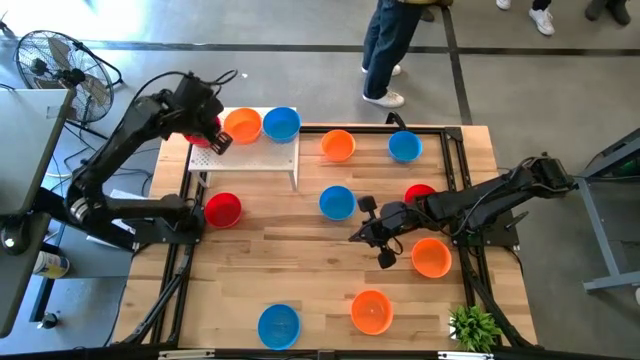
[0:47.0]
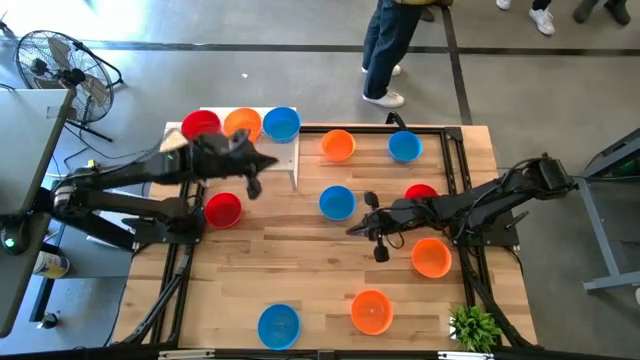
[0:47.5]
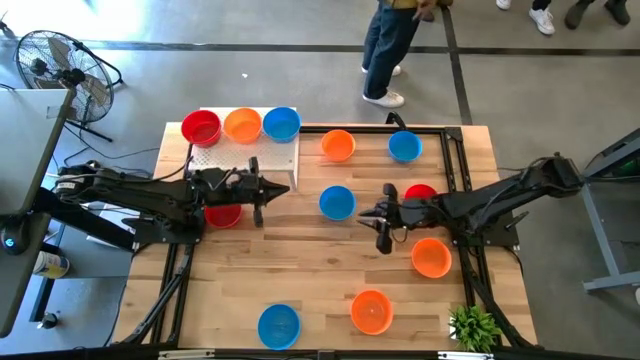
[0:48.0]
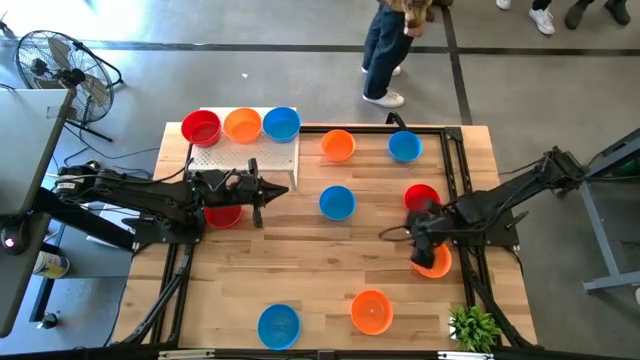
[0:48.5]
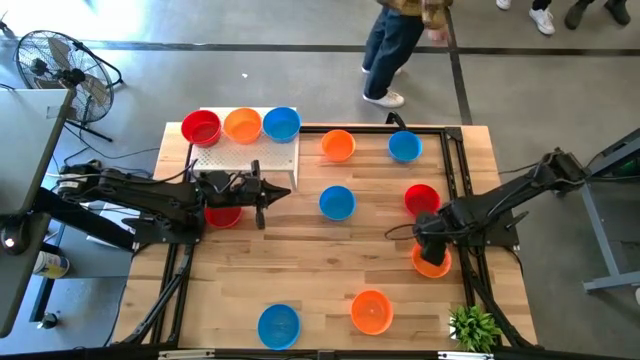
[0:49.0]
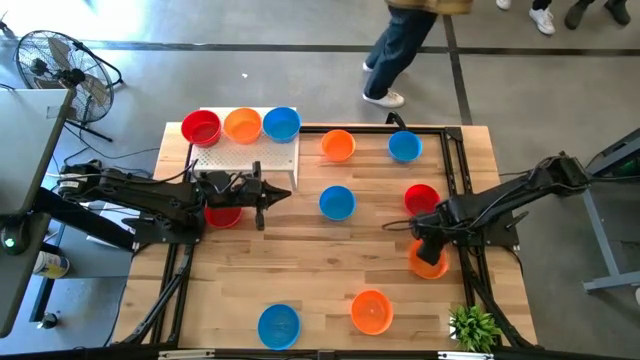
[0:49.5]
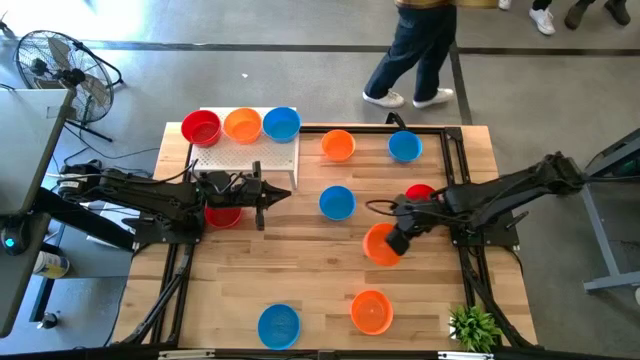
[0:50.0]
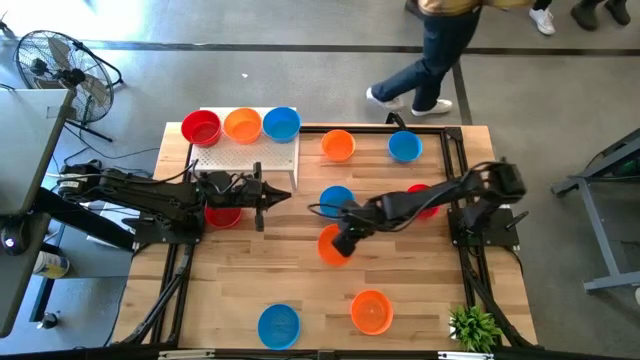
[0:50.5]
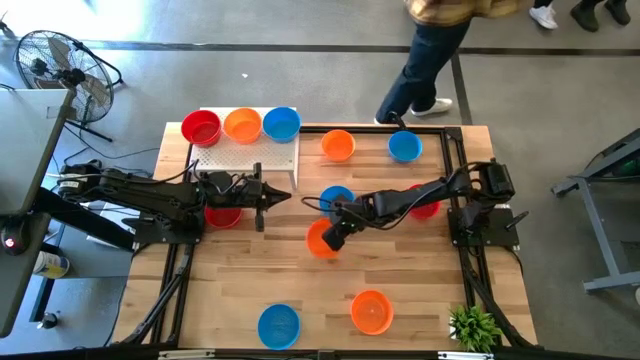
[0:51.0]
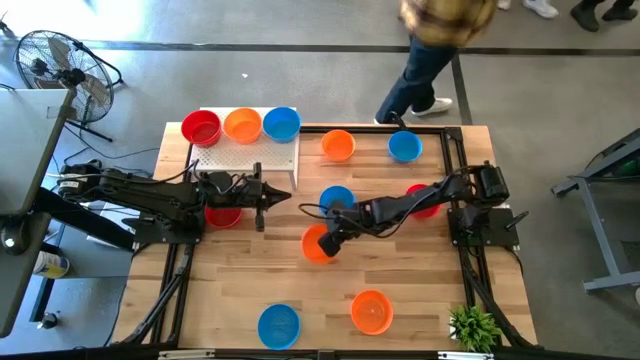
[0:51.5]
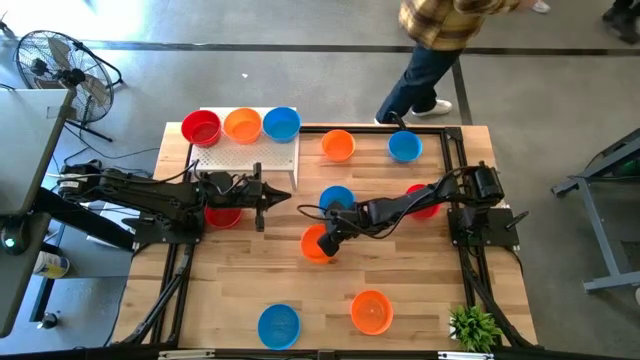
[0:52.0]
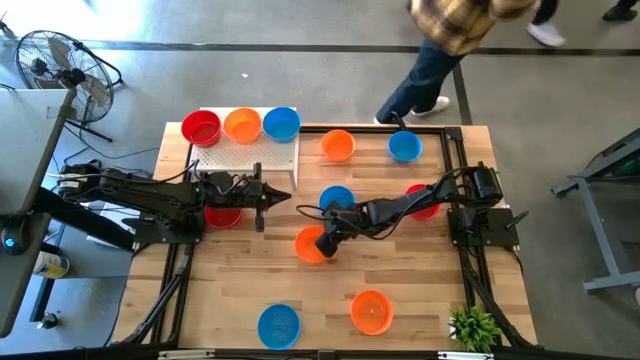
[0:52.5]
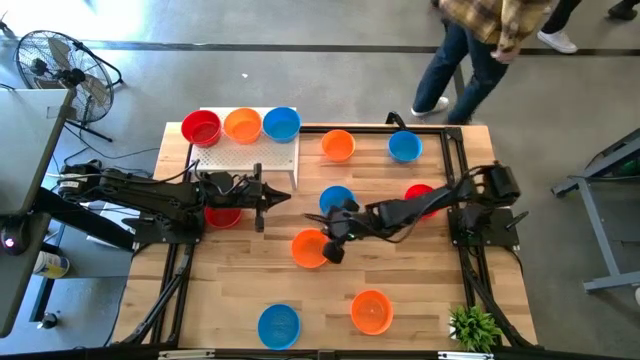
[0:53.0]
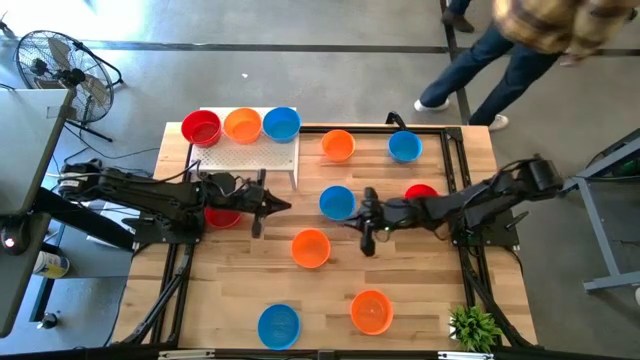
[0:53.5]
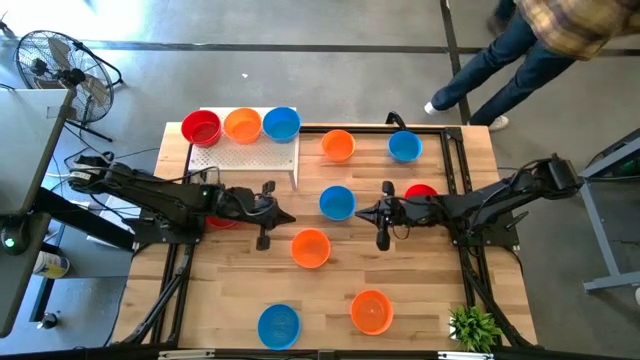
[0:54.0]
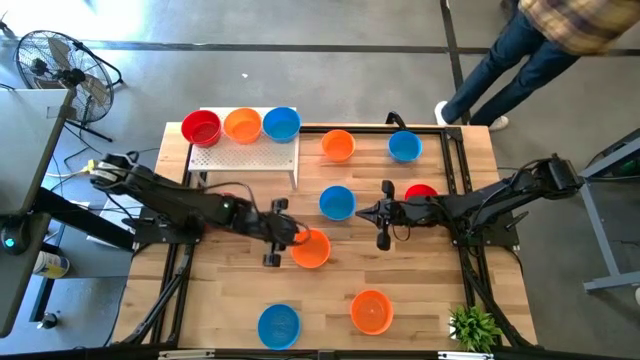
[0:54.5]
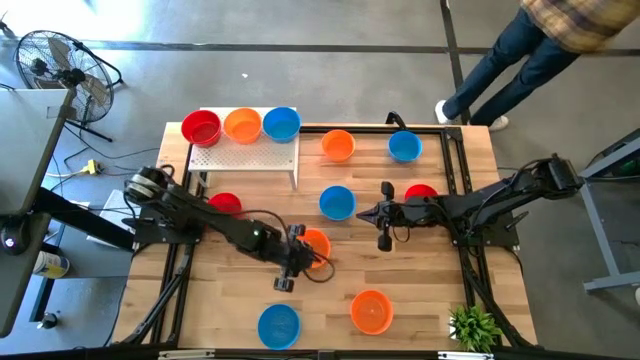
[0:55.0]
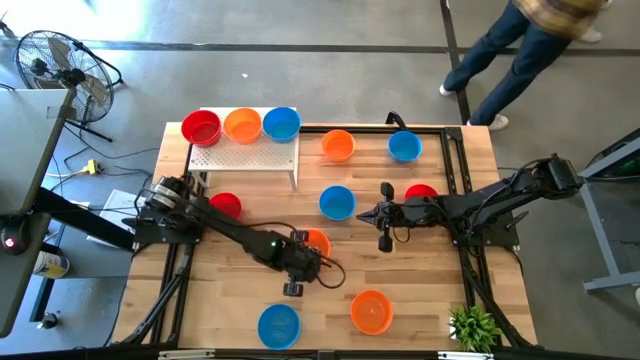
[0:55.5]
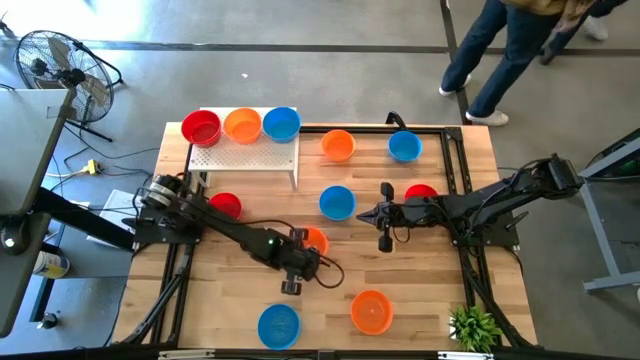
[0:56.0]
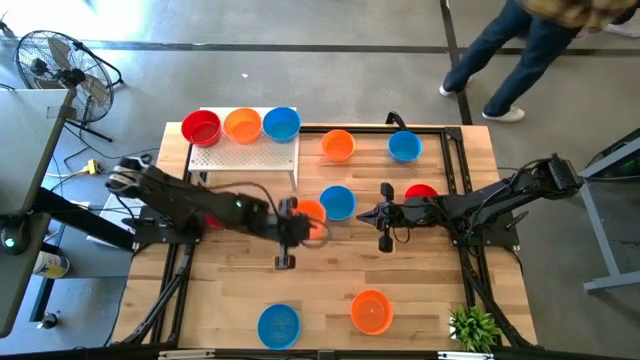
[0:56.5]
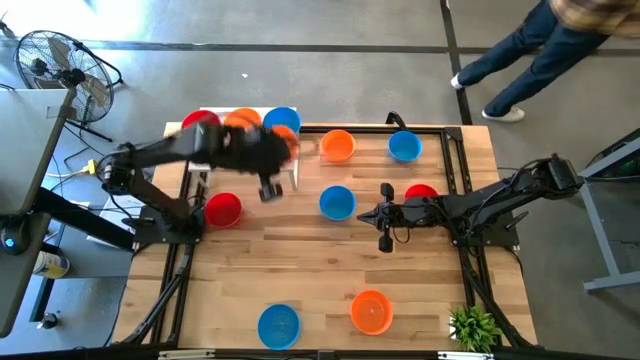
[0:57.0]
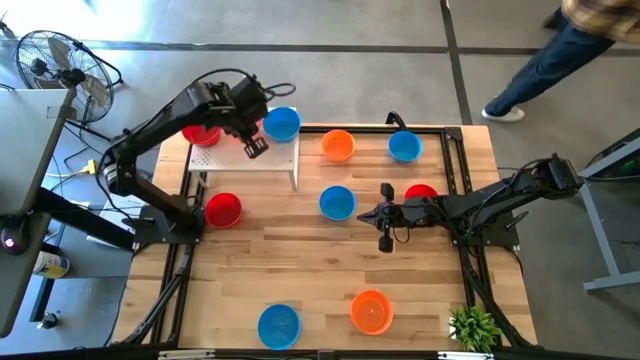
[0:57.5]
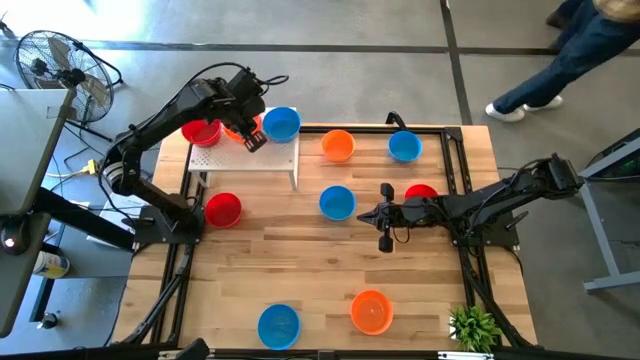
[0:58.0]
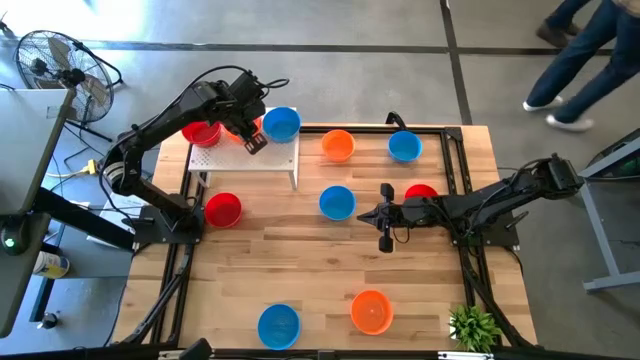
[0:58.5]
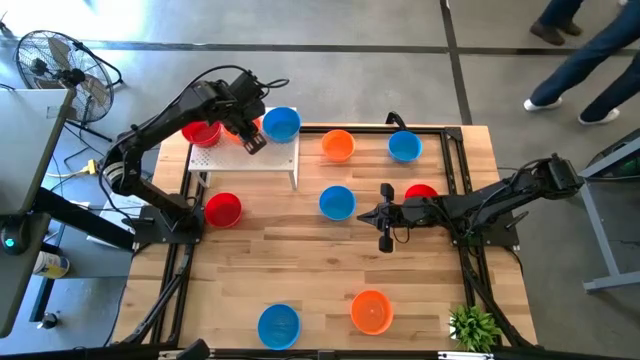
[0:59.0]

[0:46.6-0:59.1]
Task: Pick & Place Mini bowls
Stack the orange bowl on top of the other orange bowl on the shelf

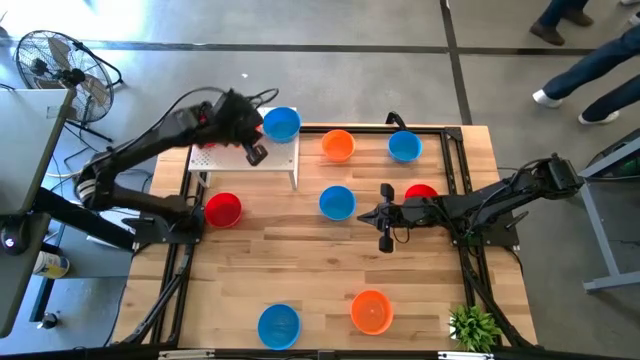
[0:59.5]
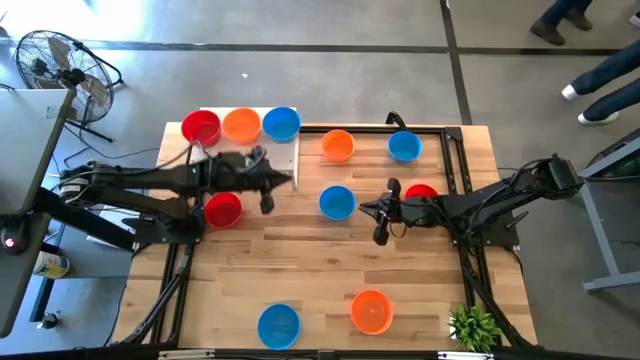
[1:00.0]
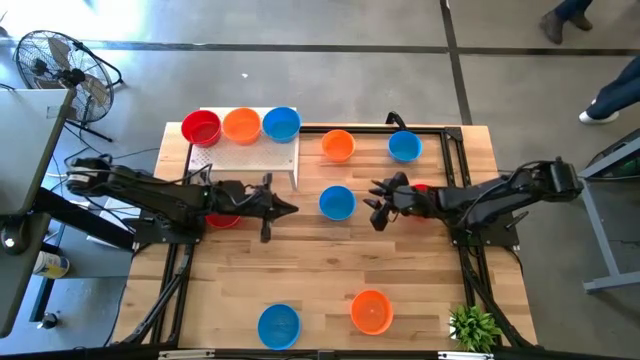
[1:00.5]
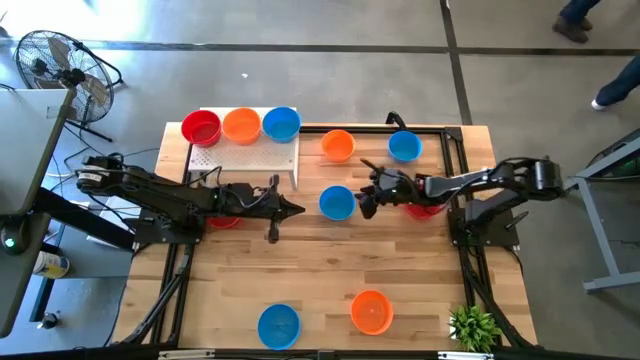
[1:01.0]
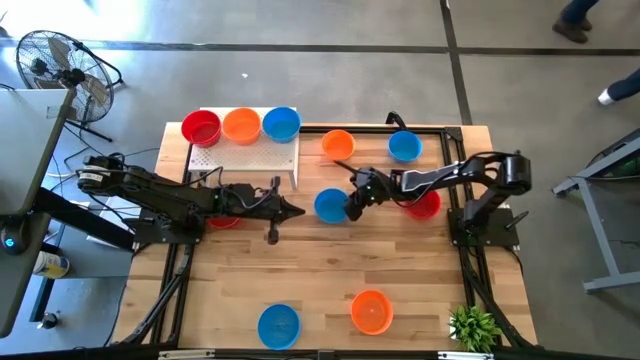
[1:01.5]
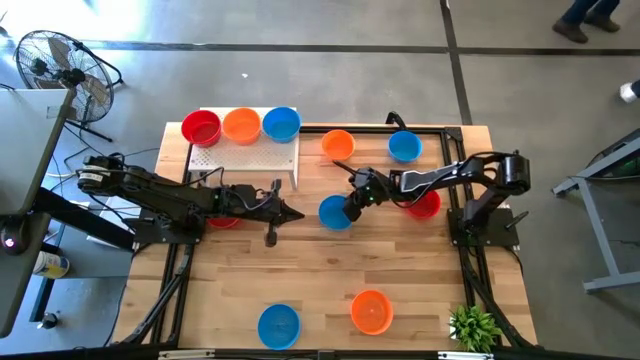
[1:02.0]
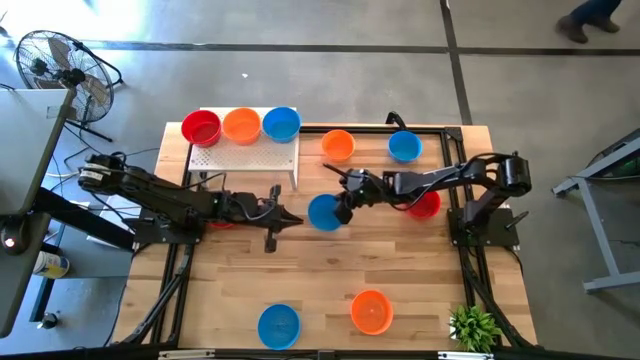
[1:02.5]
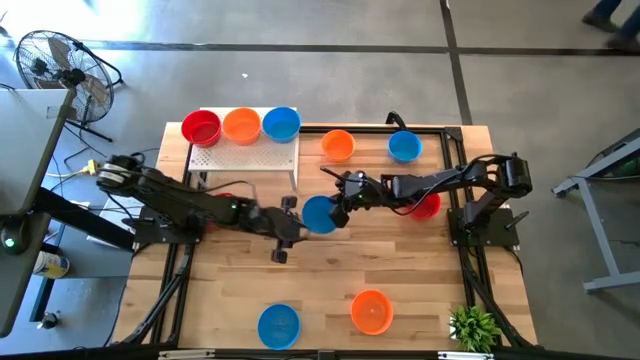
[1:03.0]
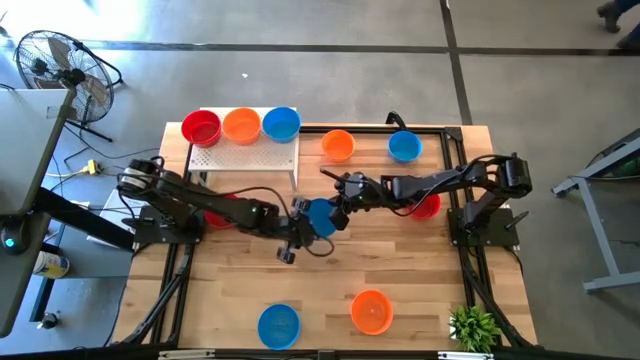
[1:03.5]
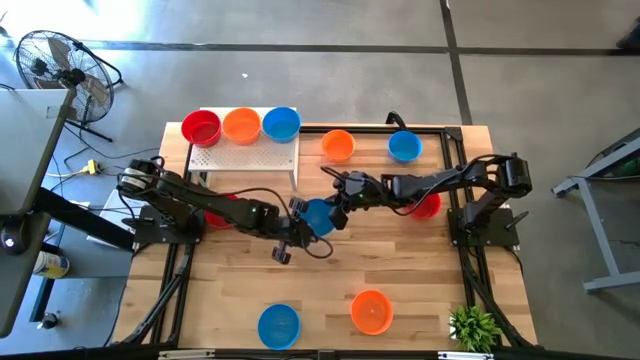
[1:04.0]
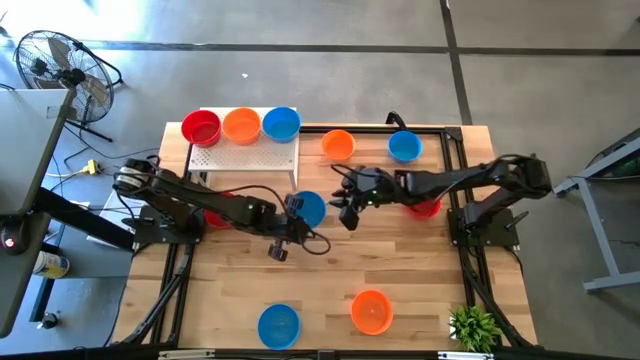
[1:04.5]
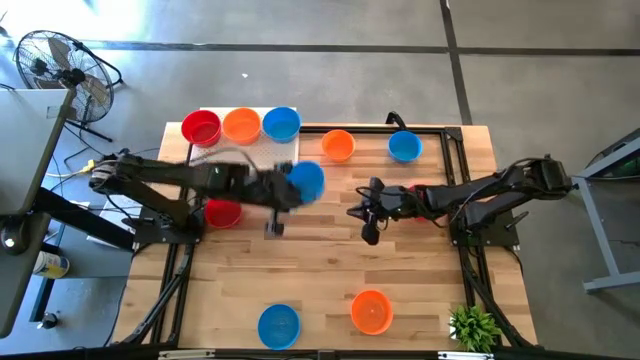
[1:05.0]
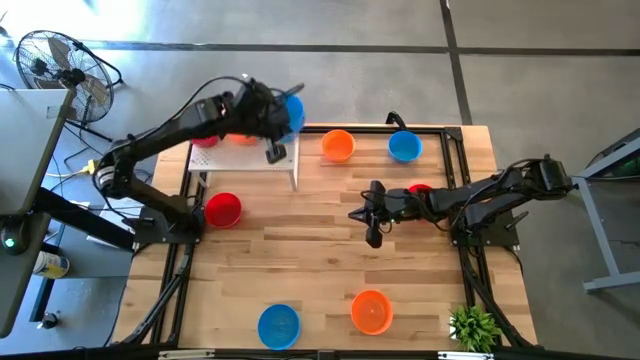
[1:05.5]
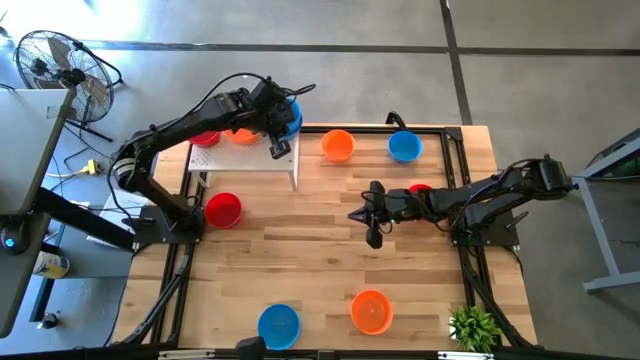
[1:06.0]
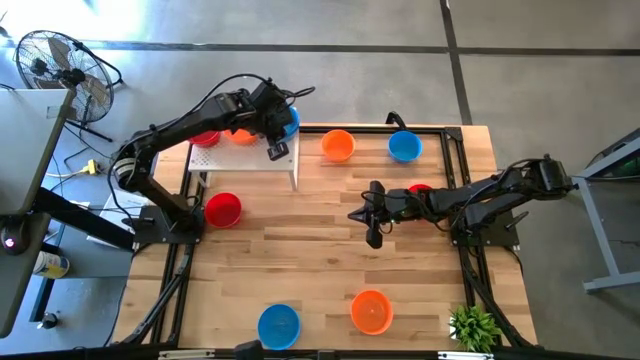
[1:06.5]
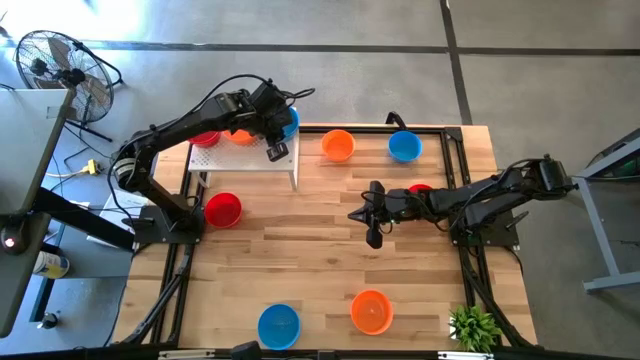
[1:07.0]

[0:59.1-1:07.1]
Stack the blue bowl on top of the other blue bowl on the shelf
